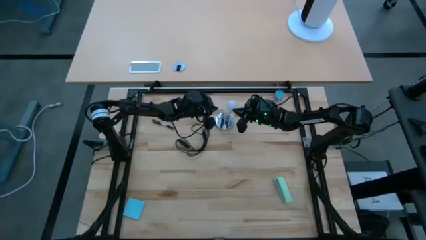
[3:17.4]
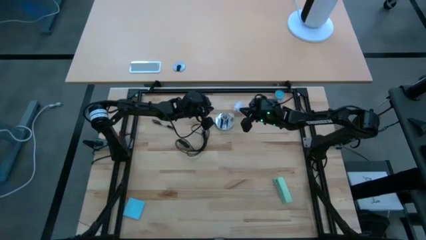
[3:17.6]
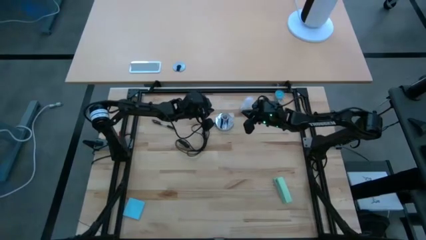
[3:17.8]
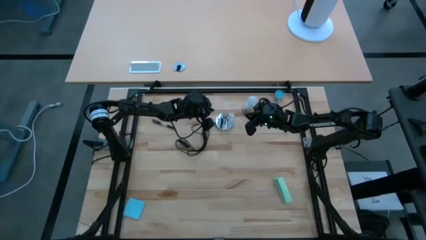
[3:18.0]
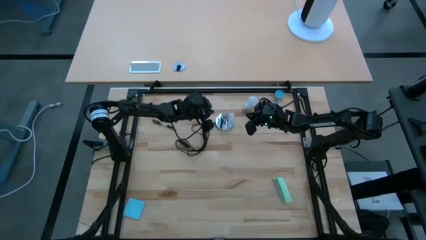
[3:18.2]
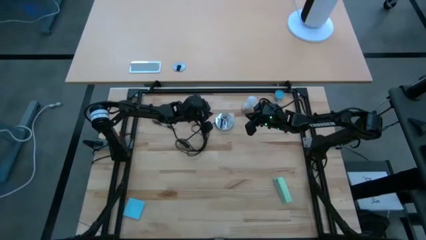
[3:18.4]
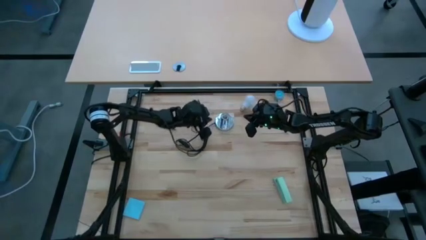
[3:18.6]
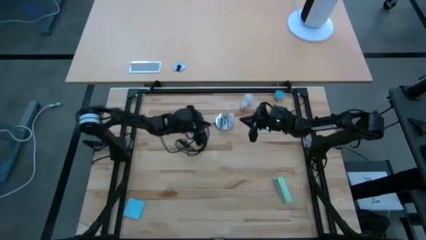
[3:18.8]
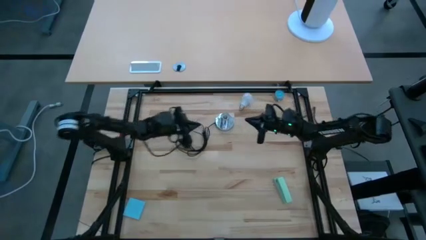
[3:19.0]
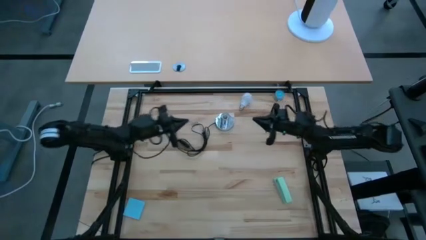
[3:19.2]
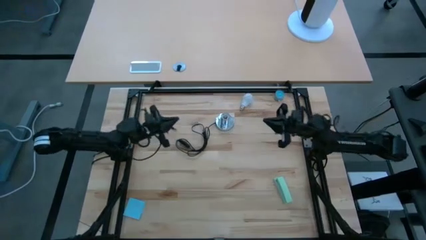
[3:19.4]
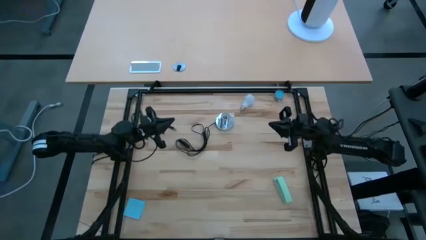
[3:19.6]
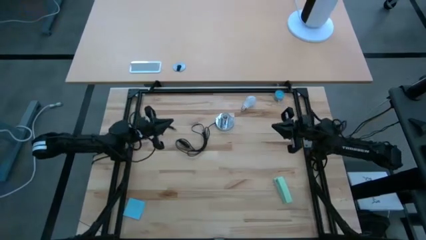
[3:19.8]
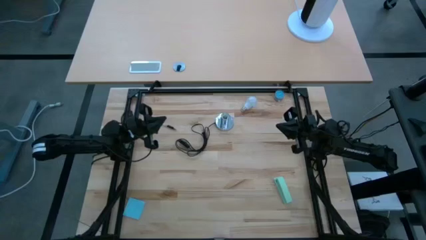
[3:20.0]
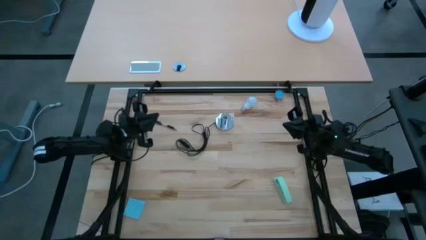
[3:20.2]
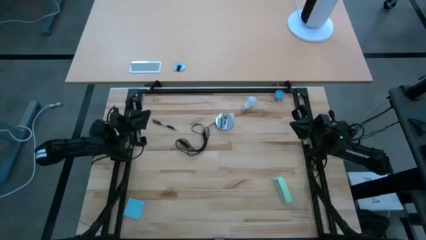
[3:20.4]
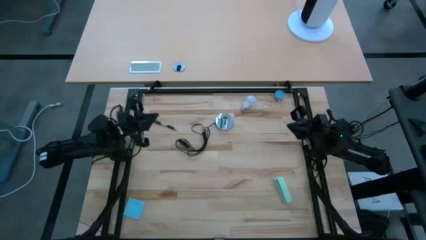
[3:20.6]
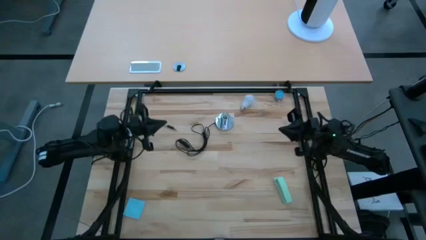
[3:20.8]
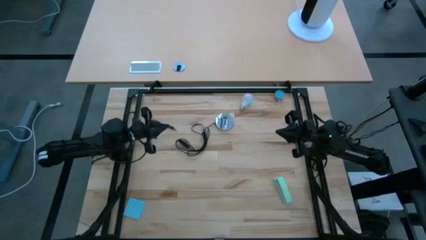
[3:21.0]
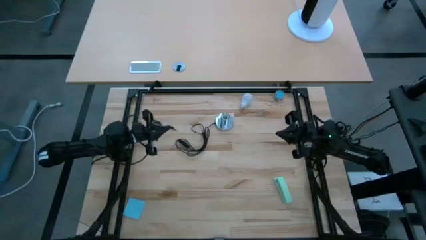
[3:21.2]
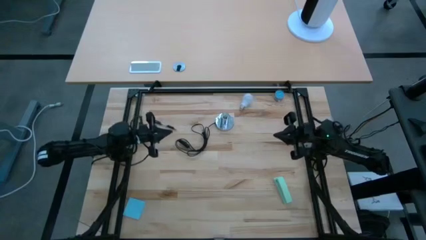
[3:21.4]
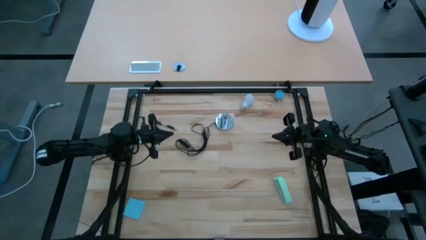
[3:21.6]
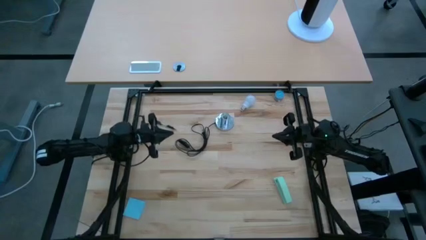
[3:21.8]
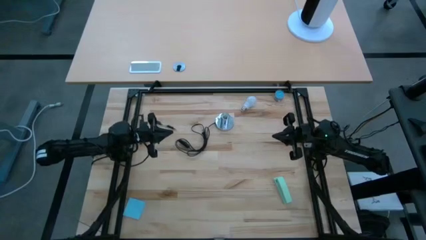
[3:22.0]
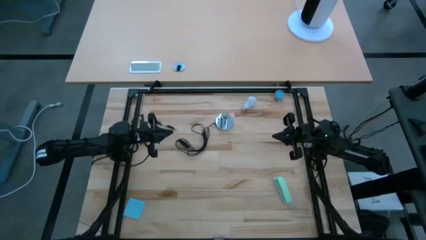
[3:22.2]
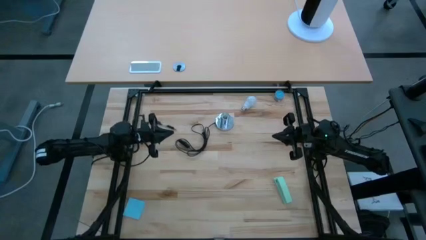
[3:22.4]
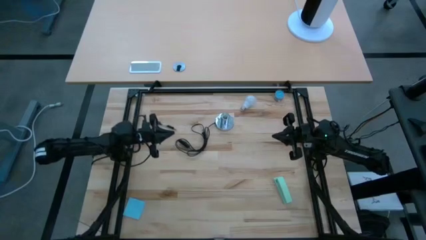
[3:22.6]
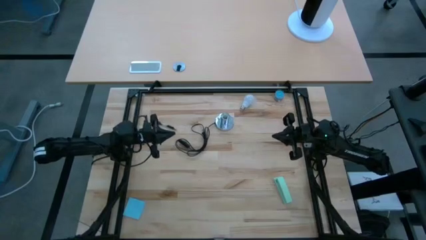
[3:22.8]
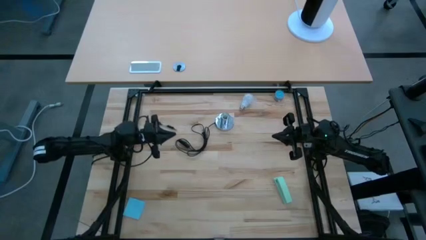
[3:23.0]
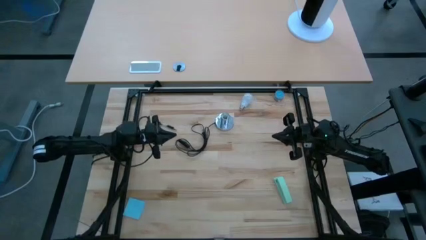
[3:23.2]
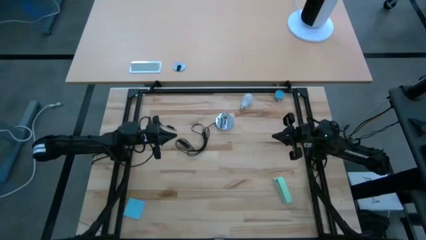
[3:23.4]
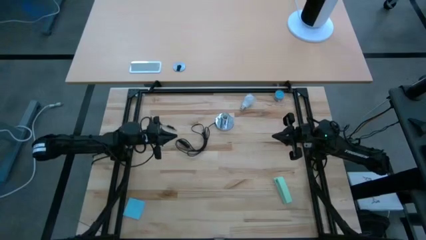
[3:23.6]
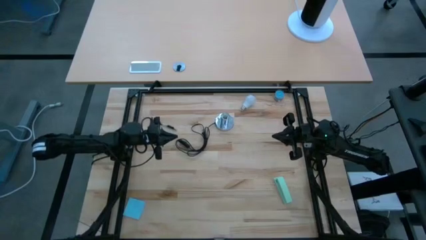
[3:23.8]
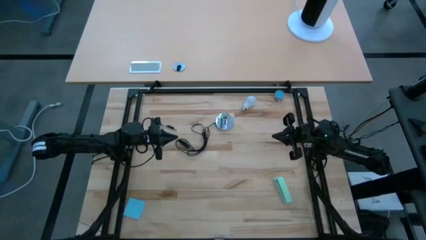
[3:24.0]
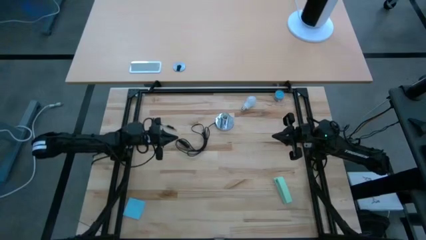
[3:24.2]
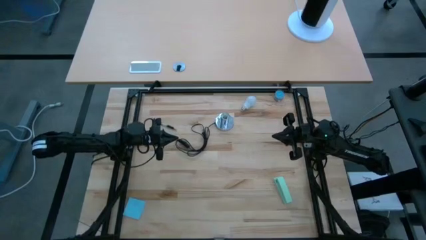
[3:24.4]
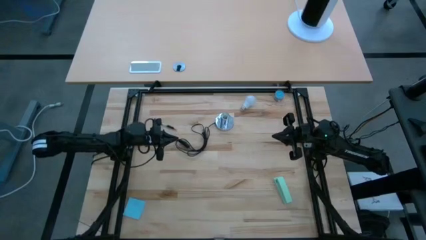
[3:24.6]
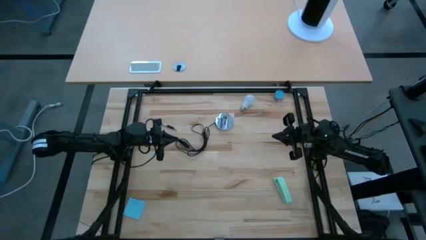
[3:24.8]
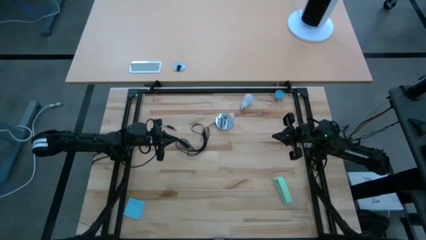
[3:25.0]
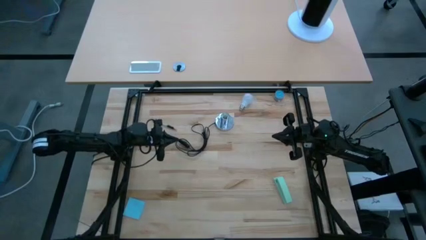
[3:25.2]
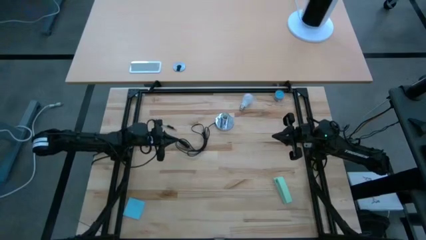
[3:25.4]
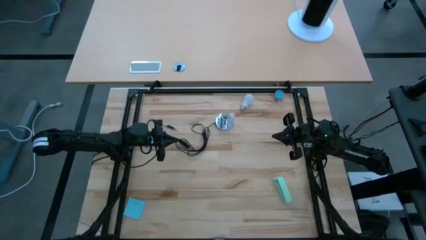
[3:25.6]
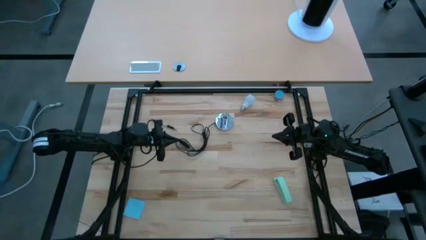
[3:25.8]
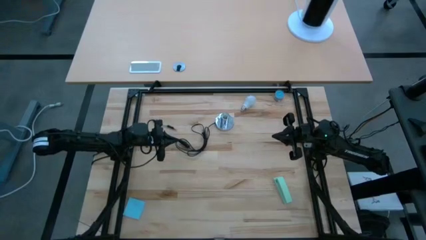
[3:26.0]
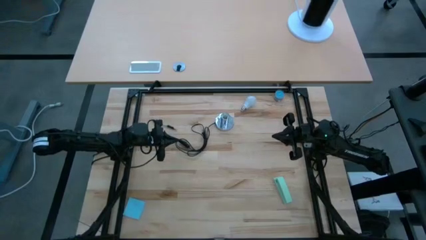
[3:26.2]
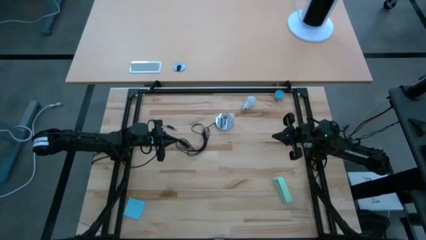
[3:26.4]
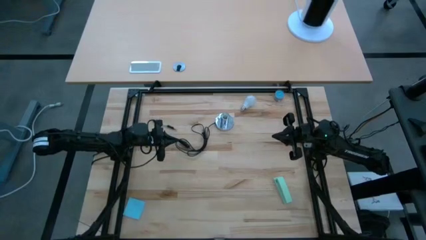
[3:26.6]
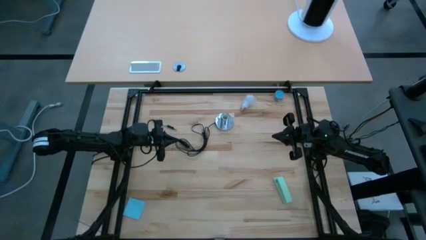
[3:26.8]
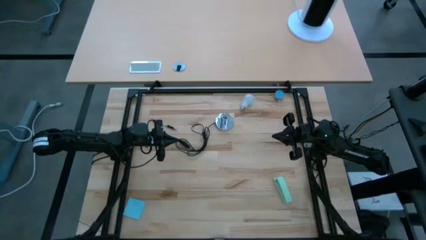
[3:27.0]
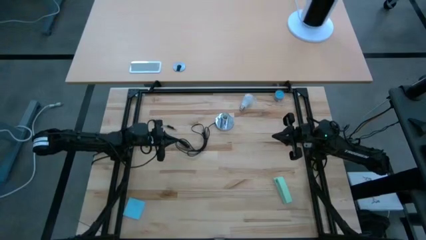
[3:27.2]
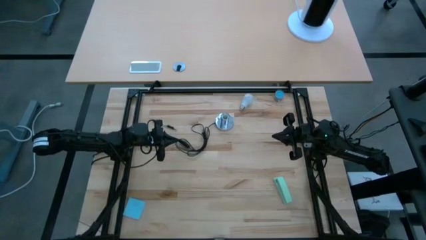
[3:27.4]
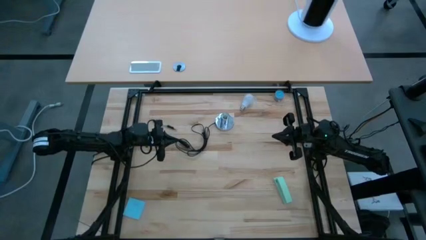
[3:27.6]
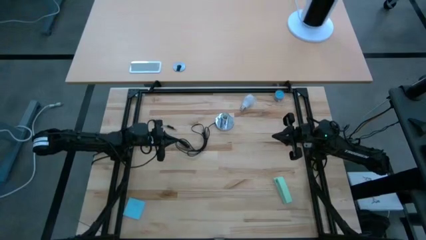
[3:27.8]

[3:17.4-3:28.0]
Task: Screw lightbulb
Return to Home Position
